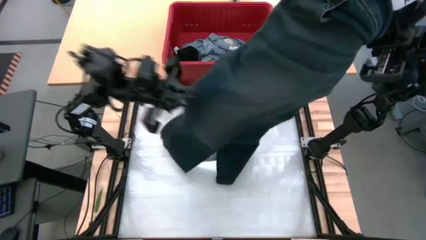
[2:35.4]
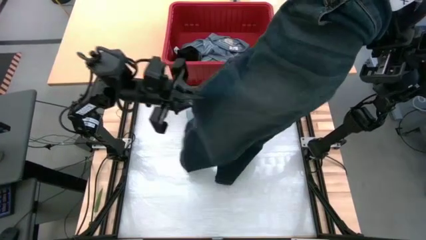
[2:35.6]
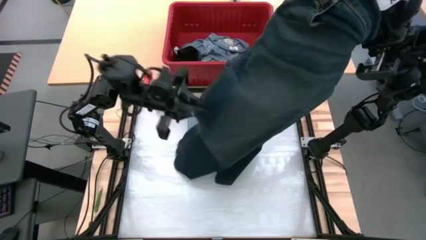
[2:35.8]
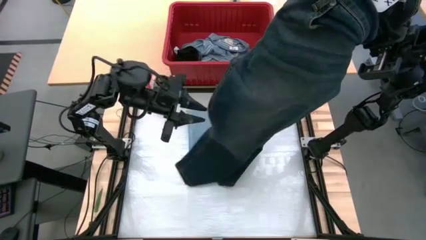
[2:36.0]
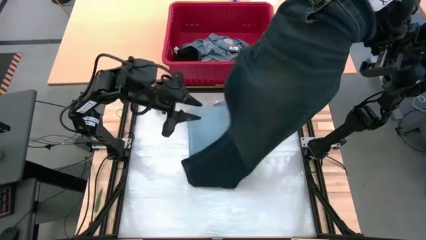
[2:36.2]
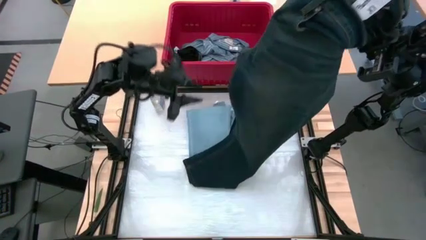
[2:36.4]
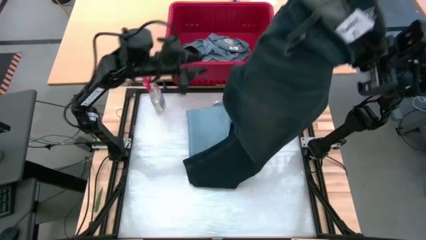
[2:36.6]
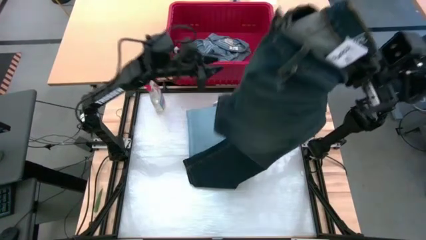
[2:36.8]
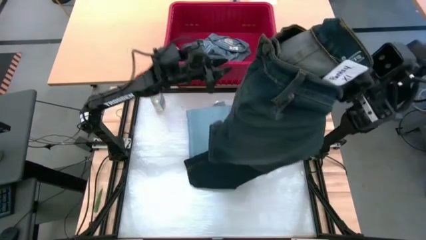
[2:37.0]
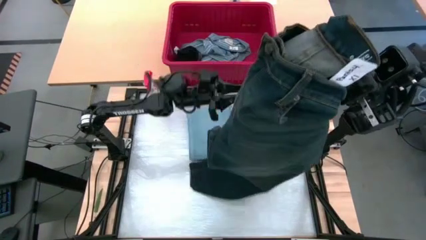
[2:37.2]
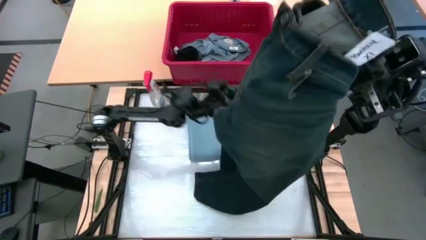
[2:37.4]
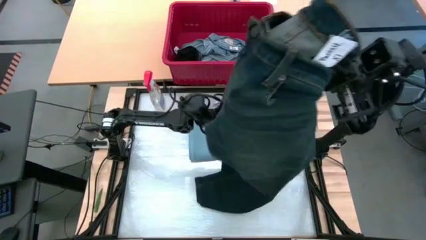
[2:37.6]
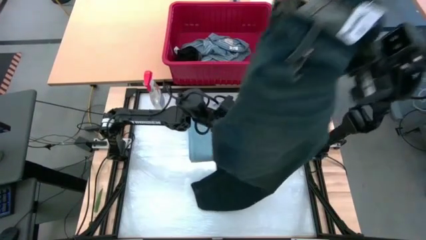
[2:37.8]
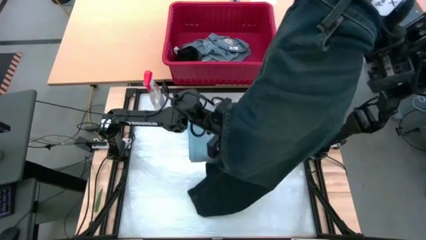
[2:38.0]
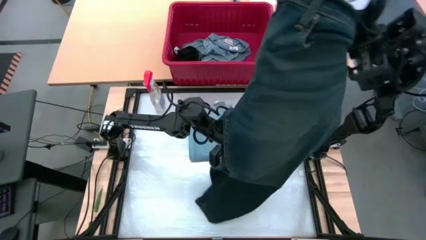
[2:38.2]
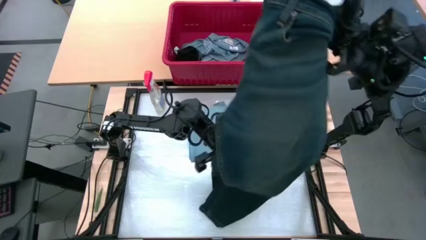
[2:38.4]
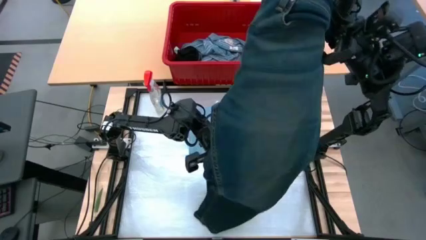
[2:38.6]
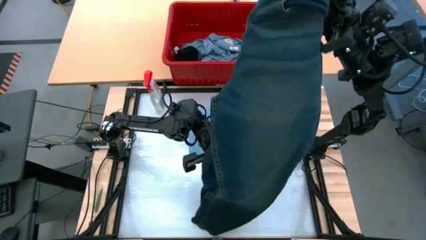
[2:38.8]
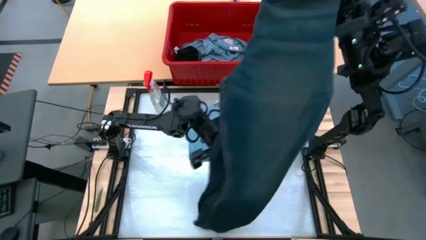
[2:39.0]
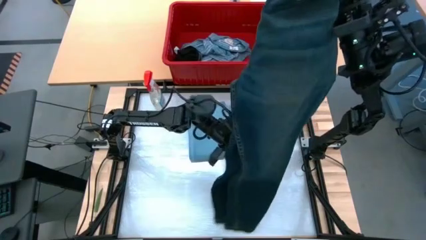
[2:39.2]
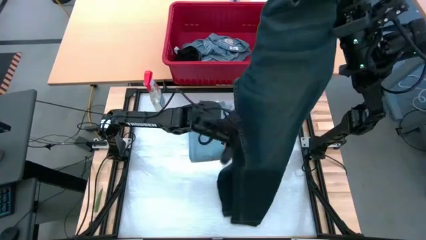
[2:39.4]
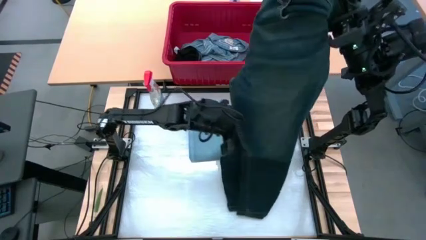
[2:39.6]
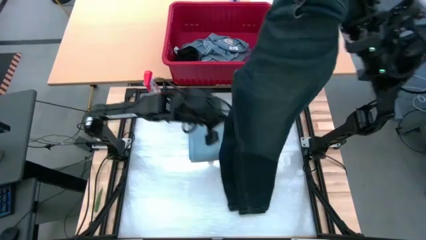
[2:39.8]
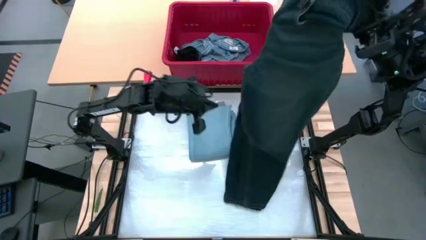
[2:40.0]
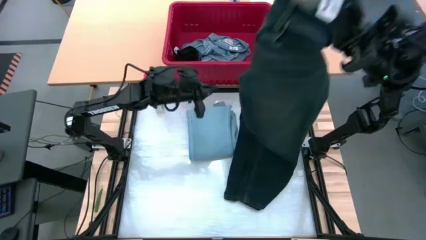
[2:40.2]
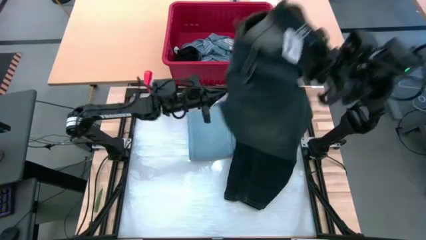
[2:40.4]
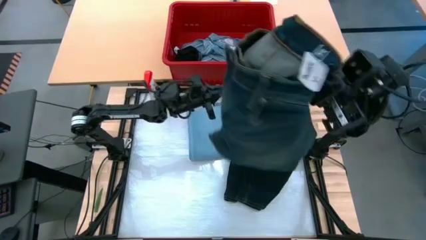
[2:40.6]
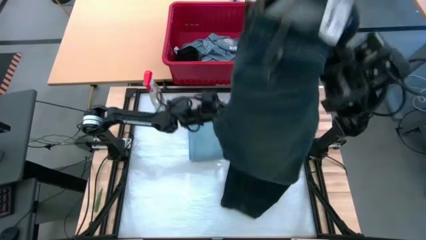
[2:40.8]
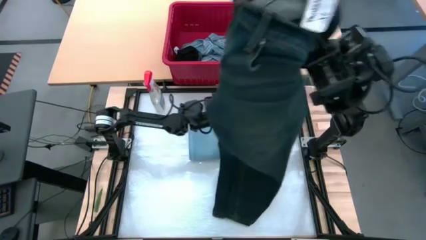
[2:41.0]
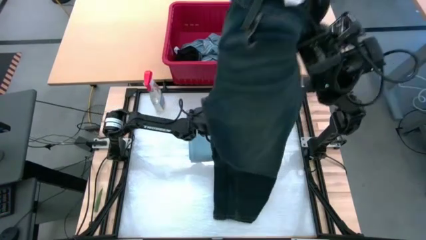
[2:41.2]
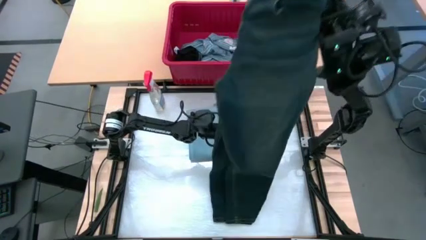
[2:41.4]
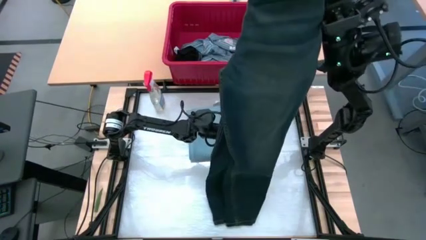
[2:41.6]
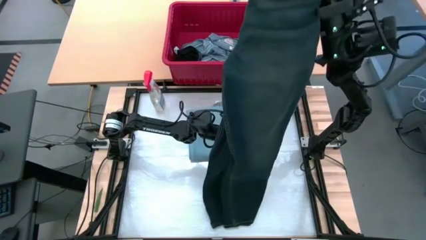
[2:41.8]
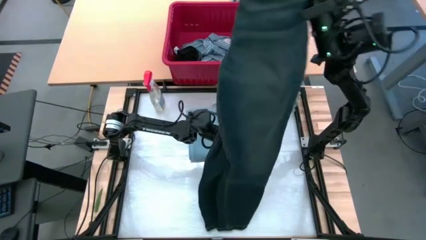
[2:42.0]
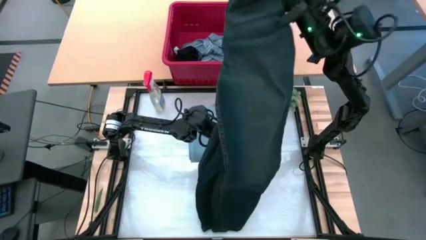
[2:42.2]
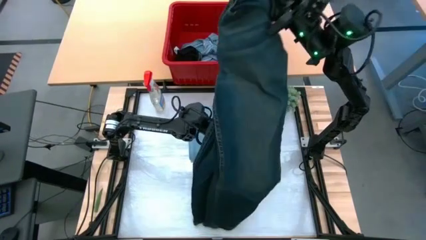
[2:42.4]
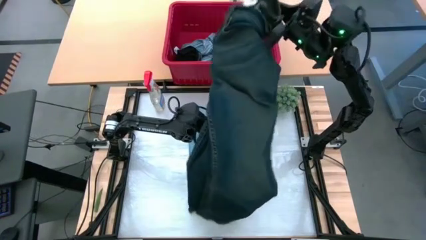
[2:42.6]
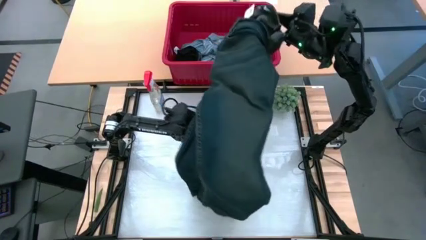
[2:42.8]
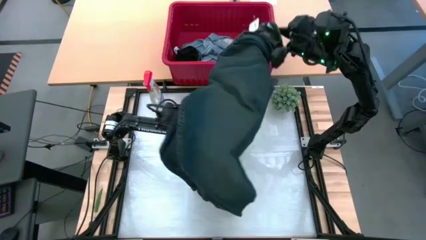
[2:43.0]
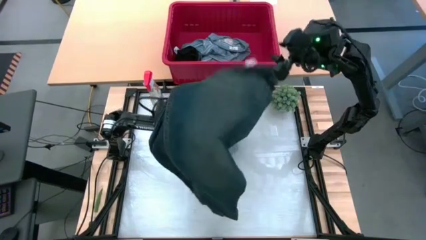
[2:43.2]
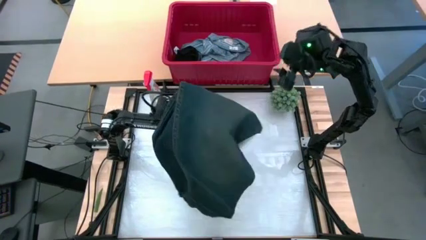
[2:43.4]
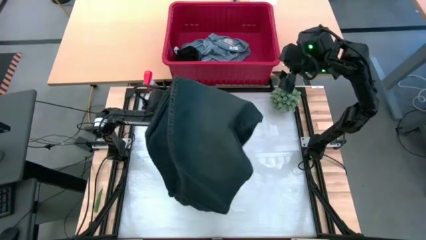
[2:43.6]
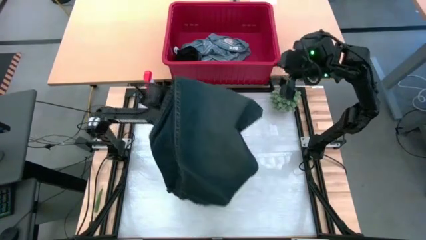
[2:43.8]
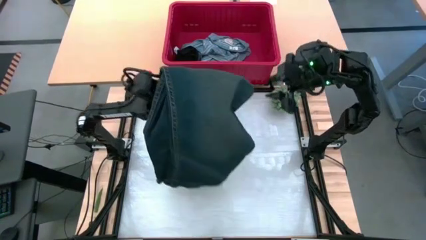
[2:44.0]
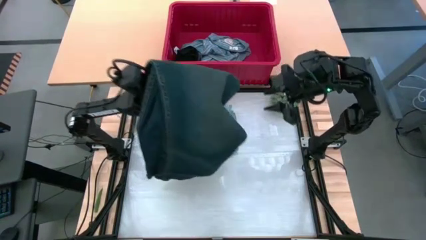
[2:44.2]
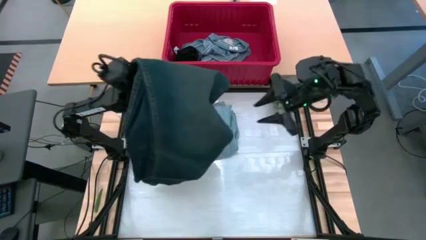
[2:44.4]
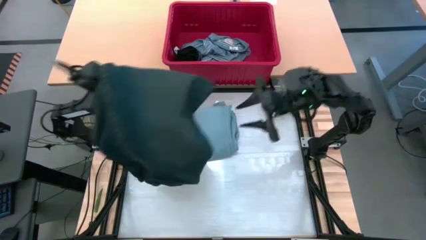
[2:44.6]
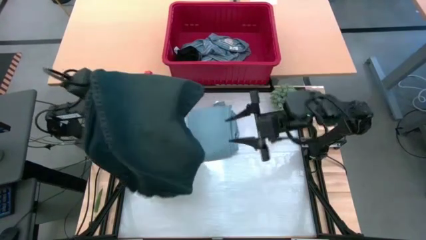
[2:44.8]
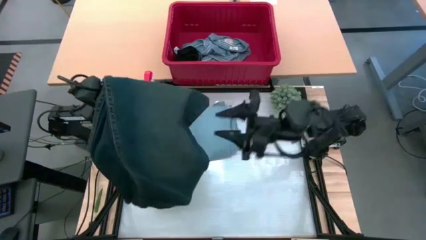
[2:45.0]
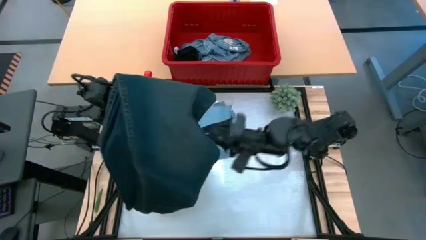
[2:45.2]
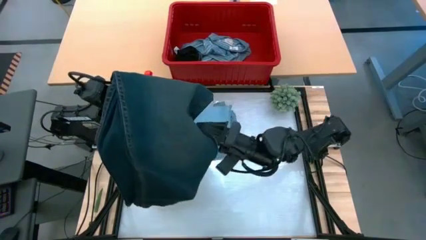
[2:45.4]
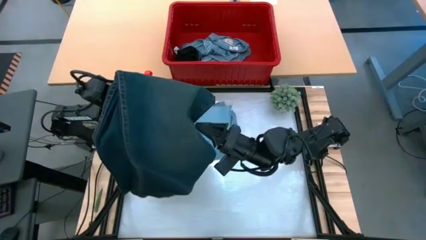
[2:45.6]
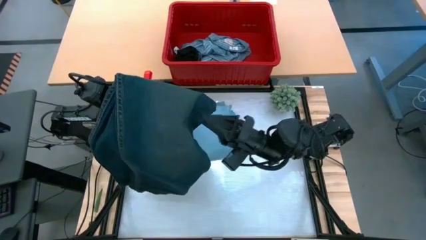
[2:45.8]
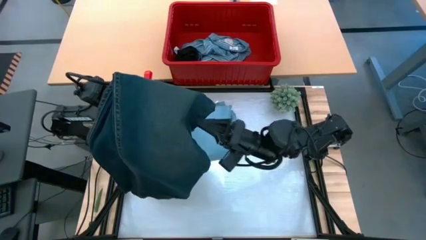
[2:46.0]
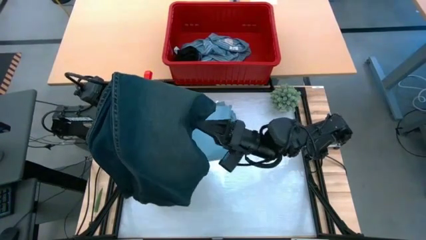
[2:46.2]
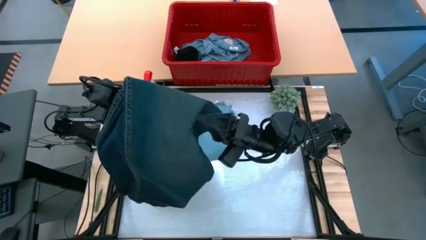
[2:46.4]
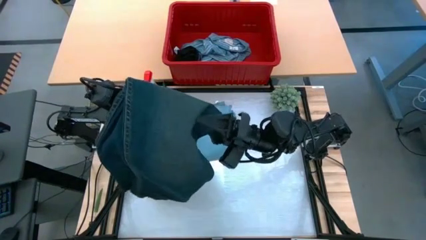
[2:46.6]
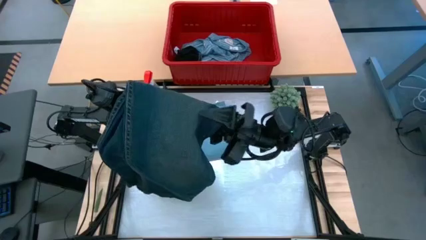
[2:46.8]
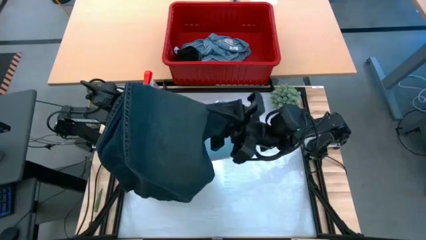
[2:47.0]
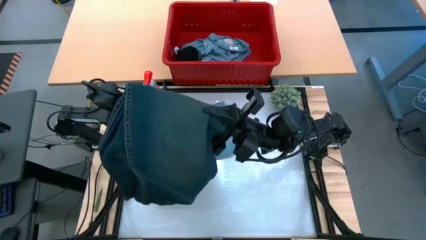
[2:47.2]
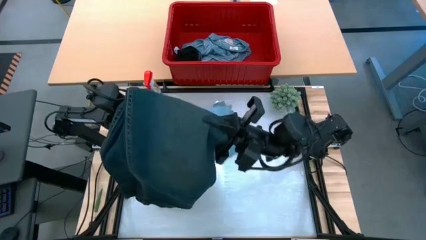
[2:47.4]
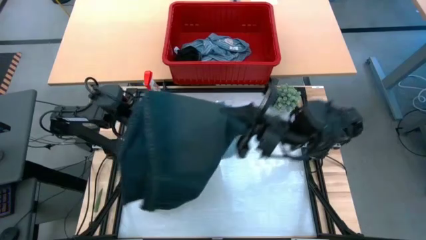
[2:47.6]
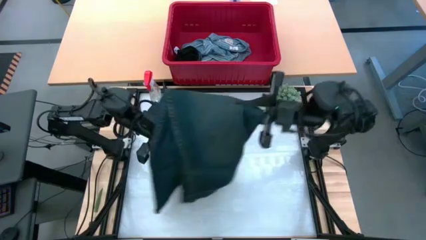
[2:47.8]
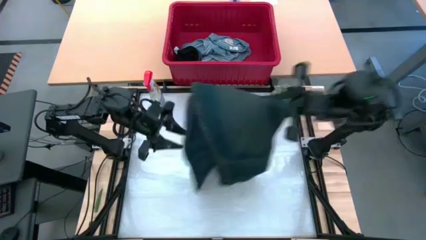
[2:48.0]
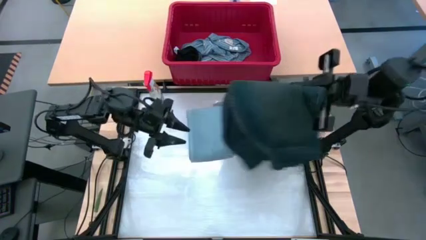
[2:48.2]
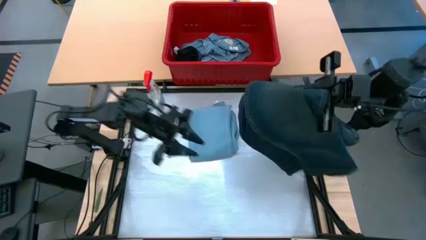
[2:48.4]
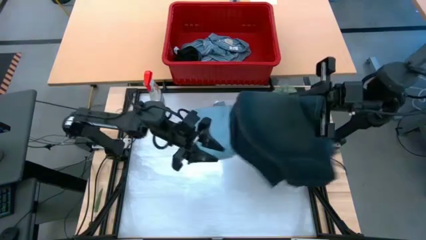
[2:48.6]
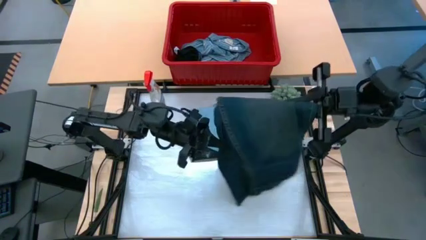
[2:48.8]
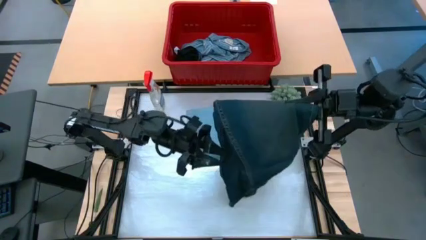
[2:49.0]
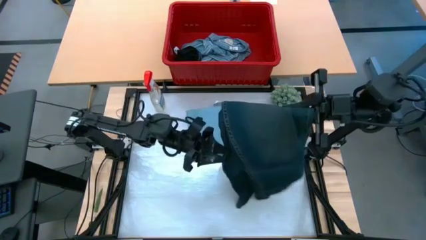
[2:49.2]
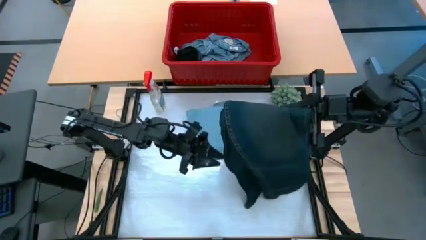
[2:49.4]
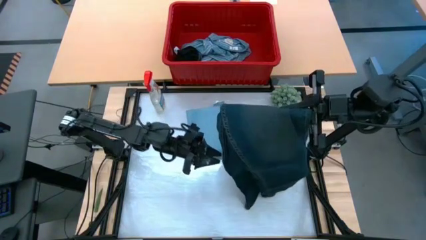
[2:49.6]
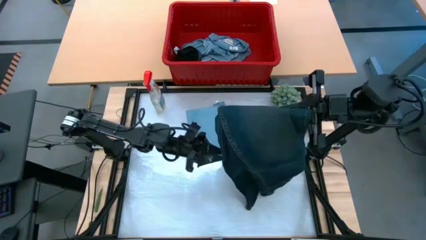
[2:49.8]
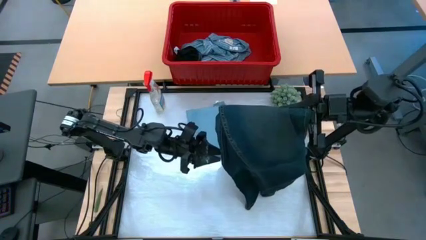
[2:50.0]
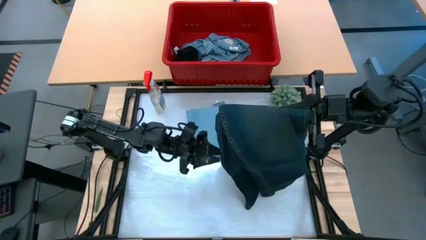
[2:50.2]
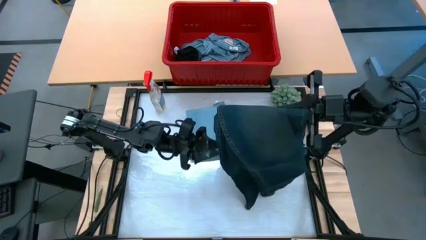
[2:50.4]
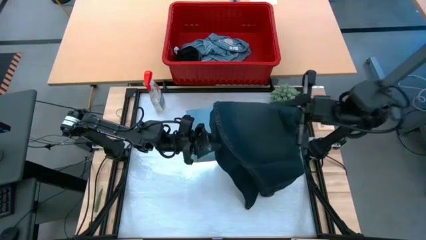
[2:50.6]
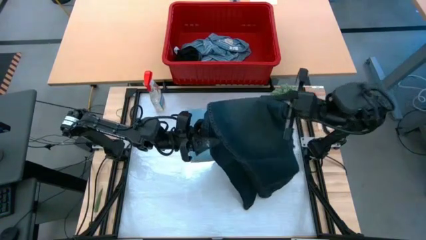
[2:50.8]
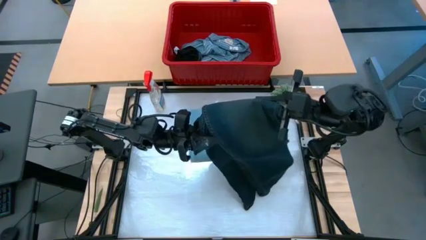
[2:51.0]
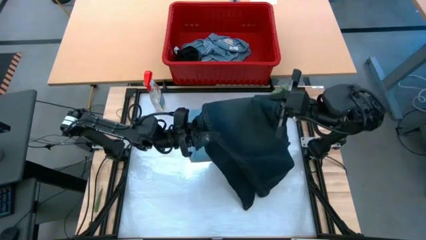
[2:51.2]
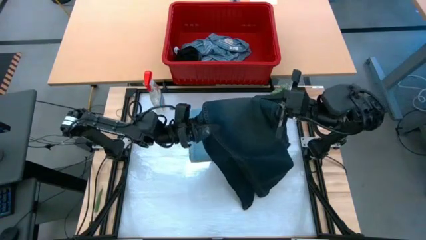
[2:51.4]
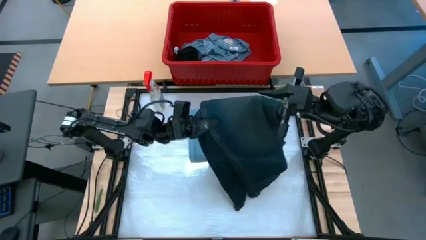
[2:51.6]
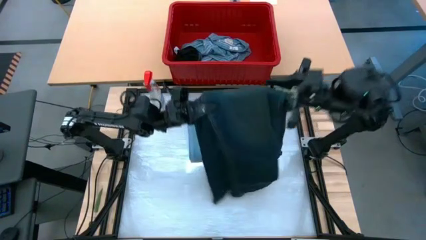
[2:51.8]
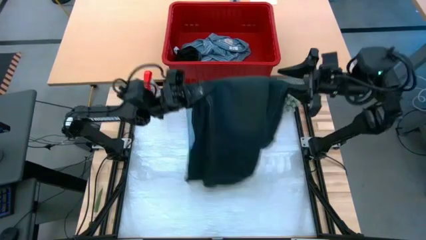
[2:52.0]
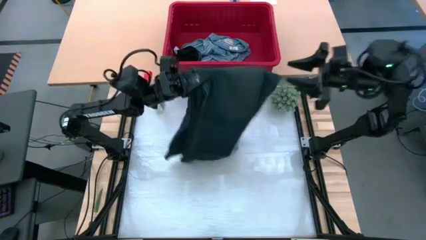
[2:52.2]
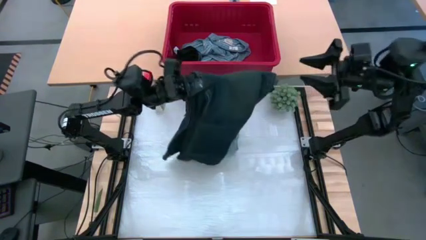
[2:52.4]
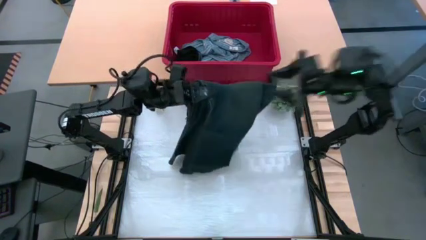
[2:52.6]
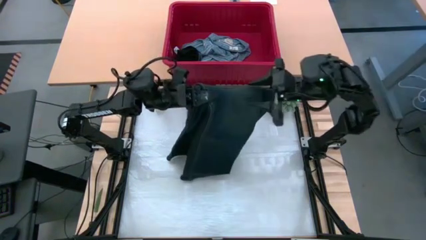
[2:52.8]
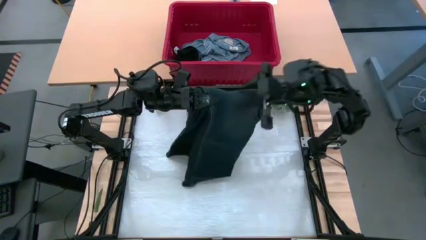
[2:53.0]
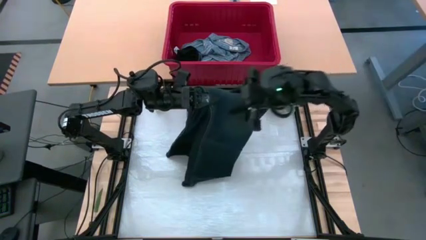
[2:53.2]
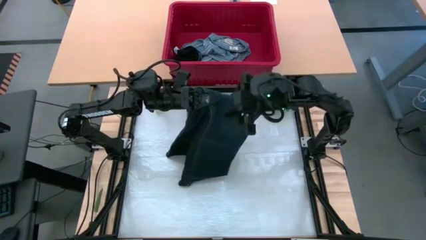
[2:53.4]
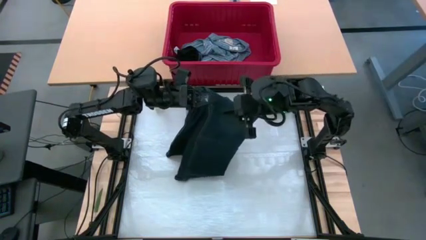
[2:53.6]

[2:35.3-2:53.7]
Task: Fold Laundry from Bin
Fold the black pants from the red laundry bin
